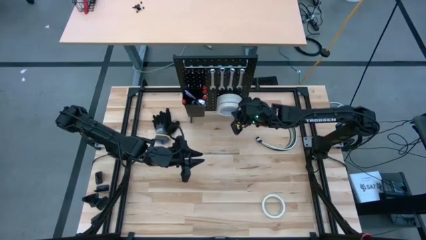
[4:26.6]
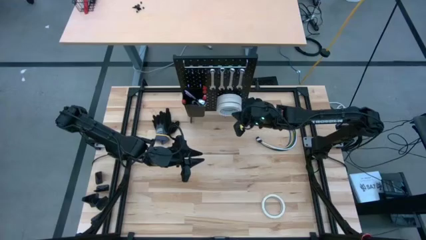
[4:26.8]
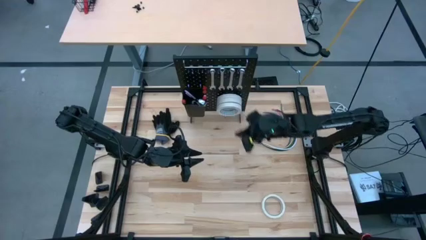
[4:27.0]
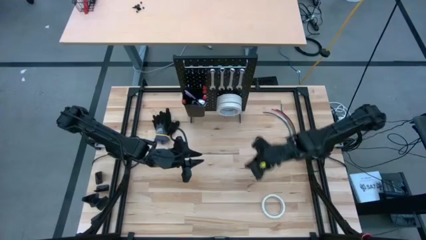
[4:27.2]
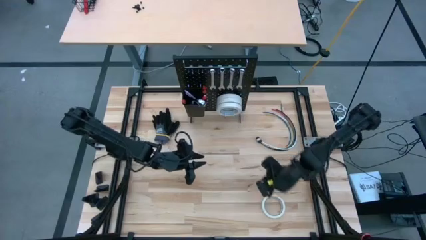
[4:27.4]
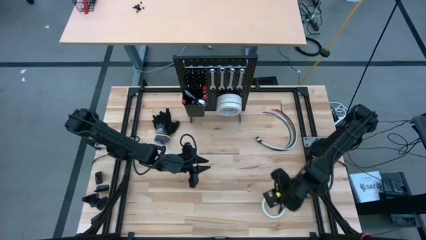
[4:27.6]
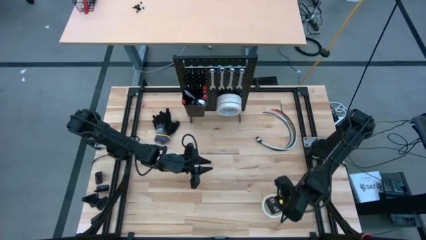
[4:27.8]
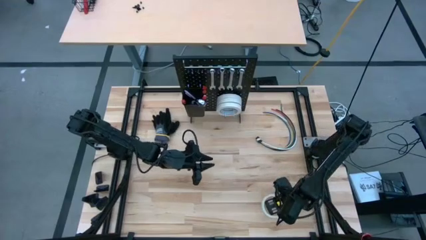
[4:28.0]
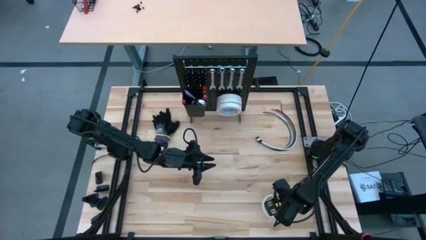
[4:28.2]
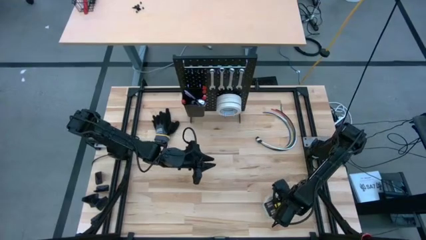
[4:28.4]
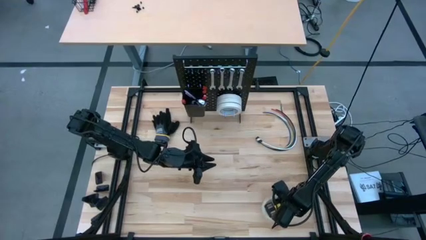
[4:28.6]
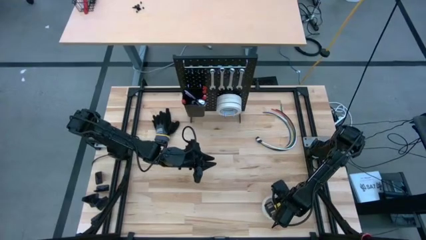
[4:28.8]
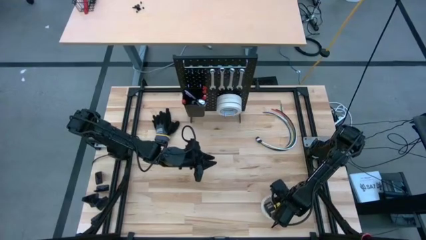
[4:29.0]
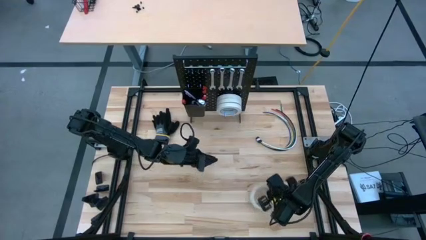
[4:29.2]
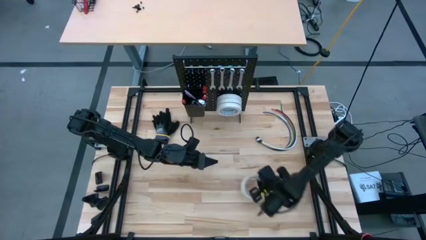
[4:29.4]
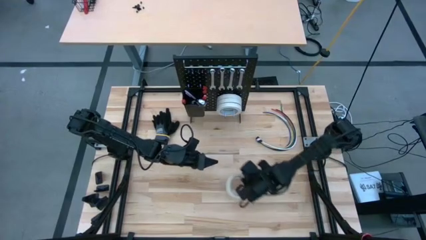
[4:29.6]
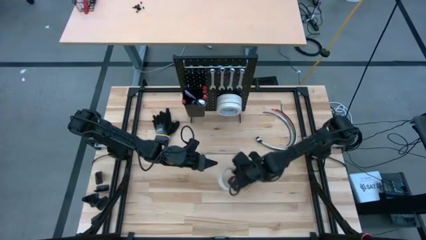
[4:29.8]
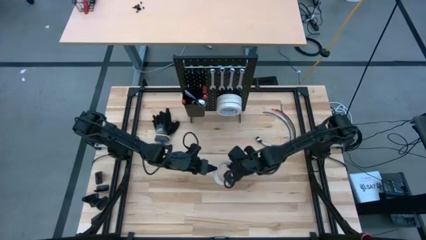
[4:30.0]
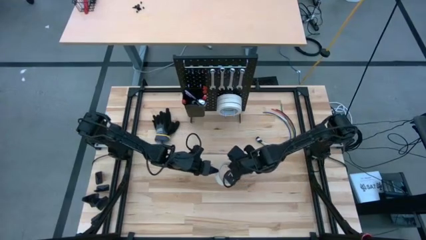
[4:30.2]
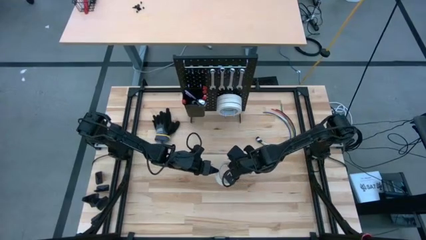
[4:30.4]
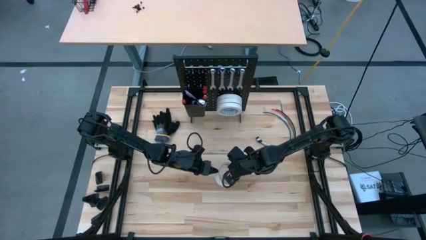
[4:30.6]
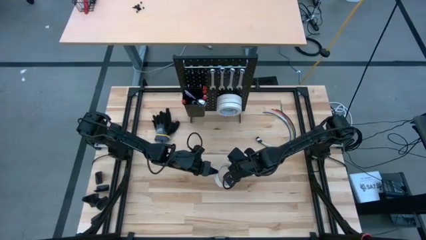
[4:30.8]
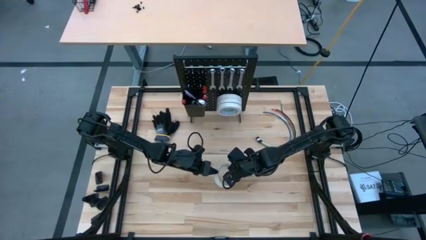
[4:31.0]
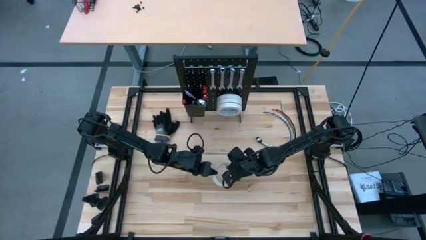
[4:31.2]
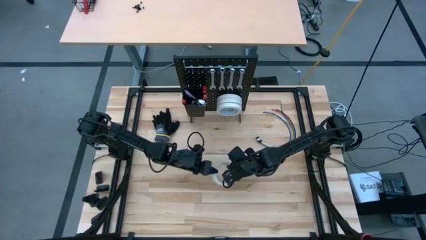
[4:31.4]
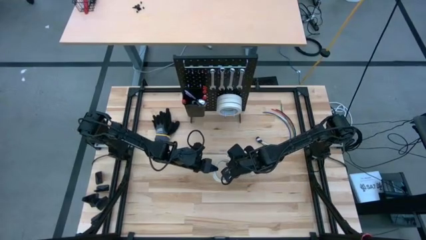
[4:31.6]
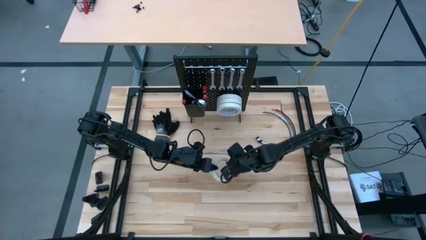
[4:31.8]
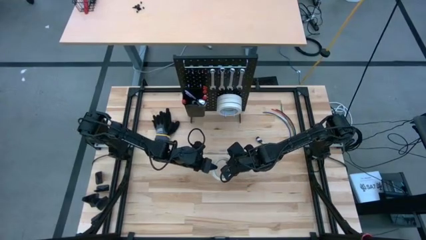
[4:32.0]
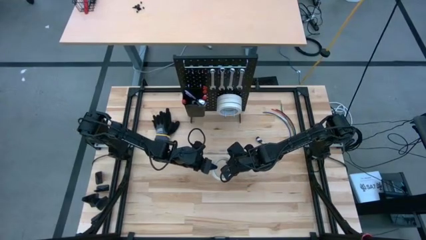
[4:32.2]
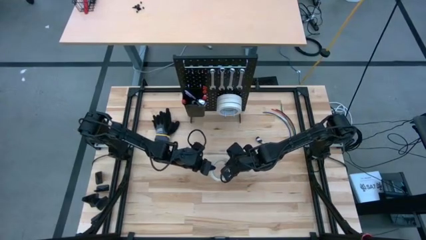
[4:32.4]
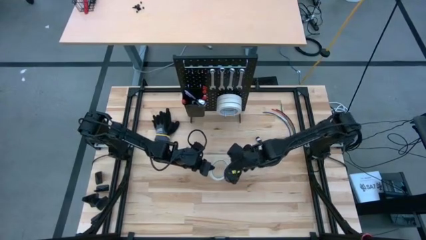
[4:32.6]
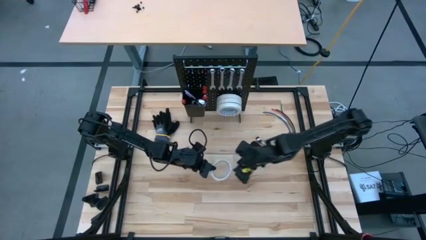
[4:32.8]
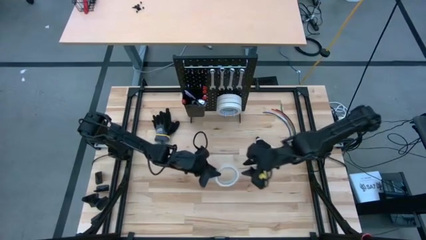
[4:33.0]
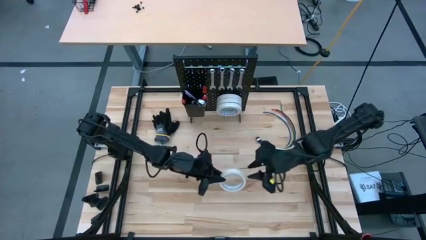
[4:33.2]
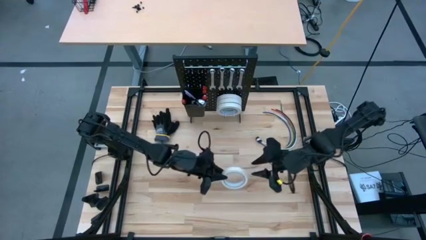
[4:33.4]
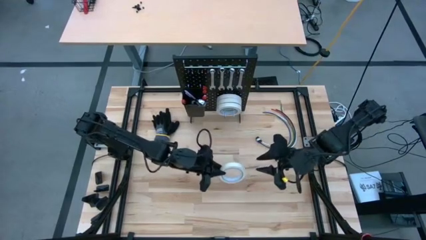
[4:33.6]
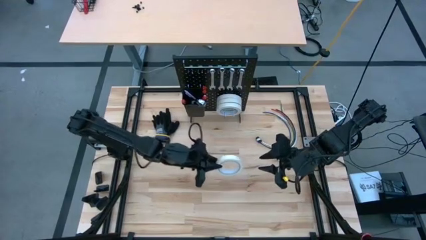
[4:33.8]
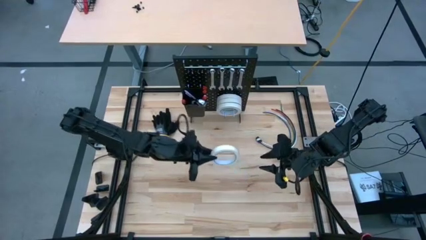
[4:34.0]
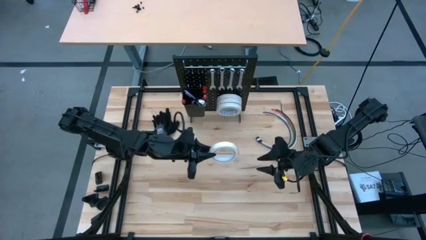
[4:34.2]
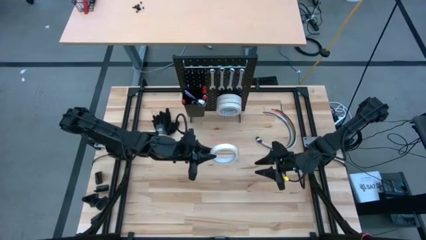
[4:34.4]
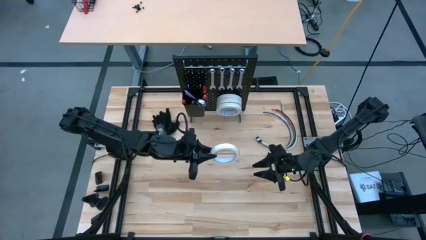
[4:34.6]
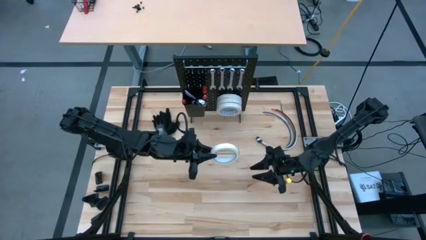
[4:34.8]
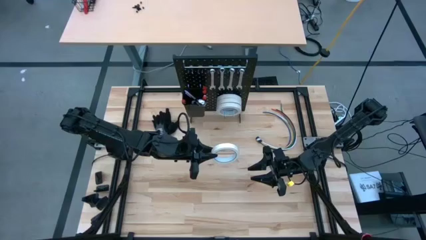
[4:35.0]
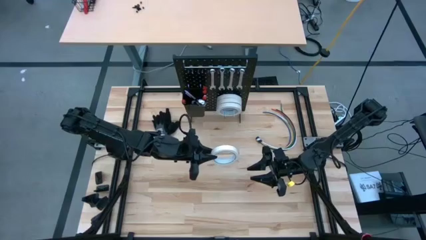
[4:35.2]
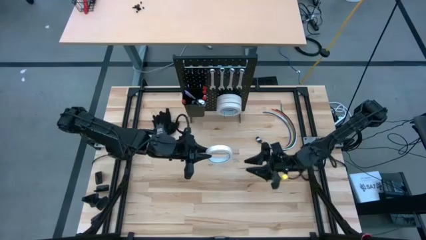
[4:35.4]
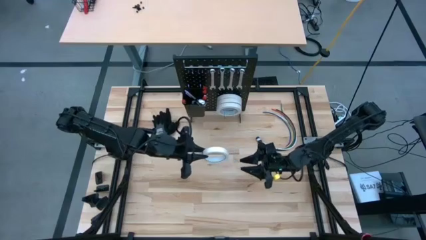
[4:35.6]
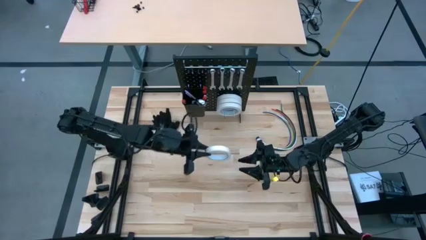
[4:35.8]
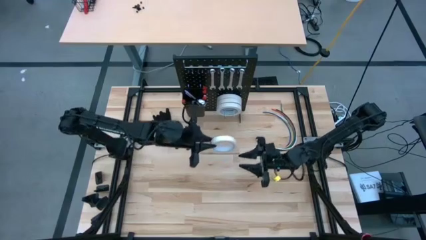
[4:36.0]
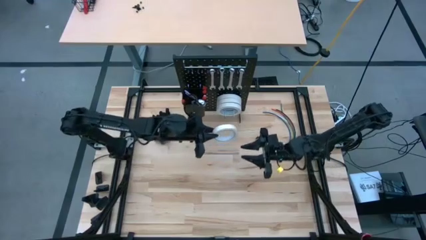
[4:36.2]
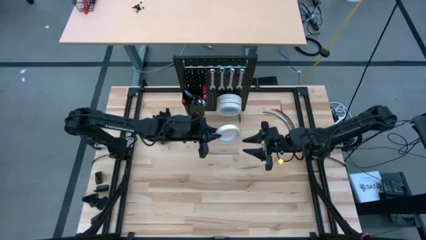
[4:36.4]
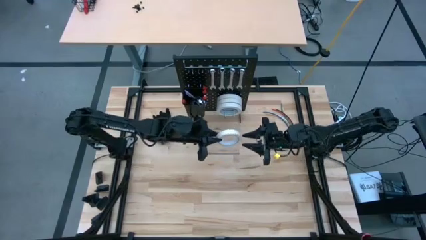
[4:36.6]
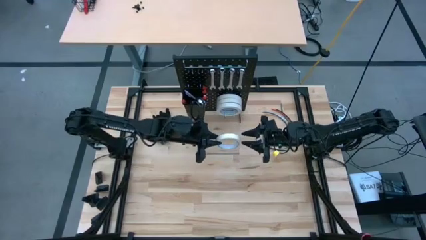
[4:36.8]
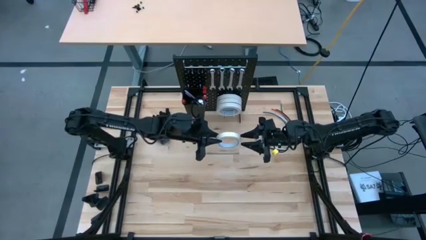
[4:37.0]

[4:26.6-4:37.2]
Task: Hang tools onto peg board
Hang the white tape on the peg board

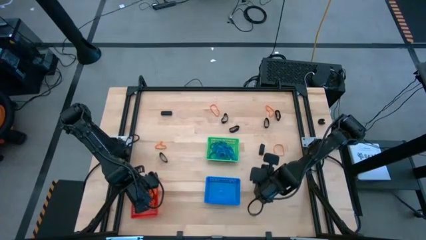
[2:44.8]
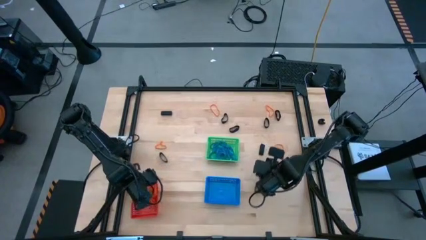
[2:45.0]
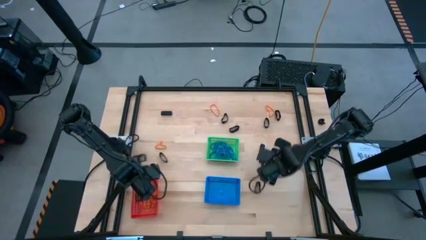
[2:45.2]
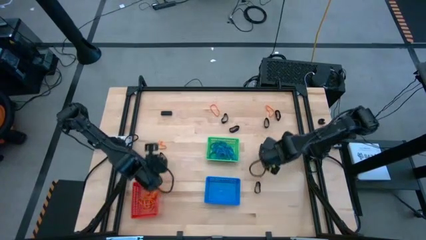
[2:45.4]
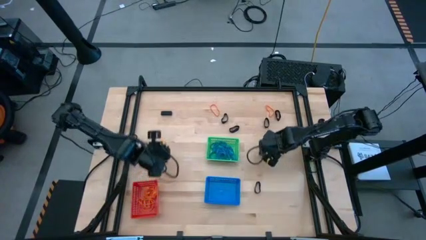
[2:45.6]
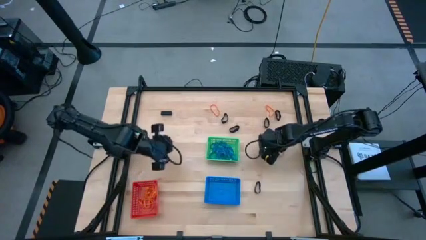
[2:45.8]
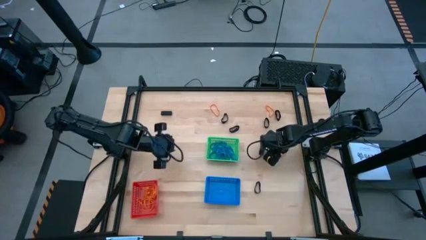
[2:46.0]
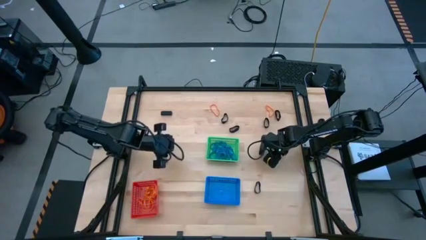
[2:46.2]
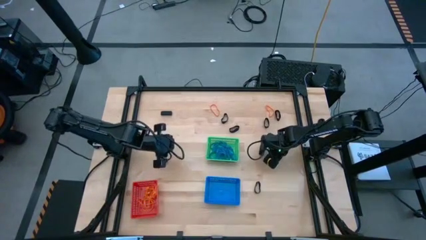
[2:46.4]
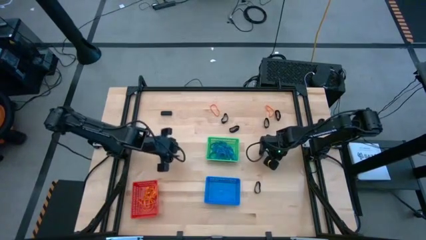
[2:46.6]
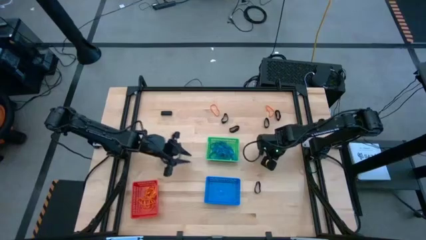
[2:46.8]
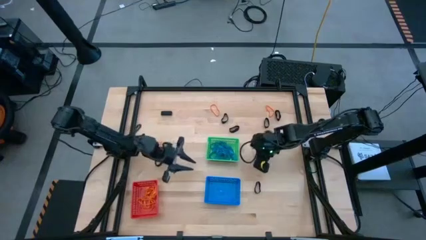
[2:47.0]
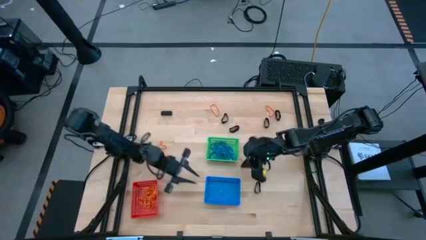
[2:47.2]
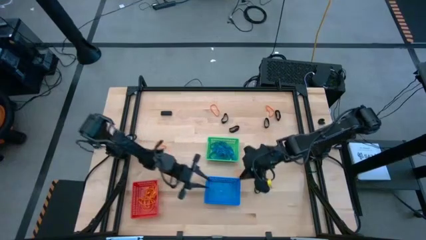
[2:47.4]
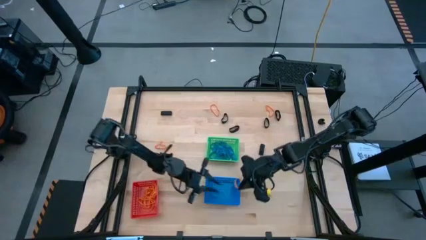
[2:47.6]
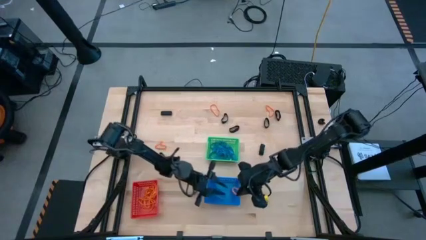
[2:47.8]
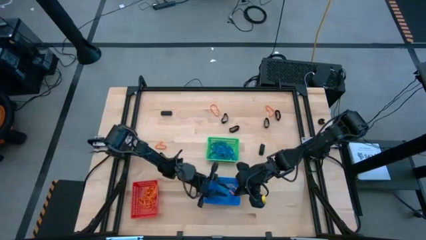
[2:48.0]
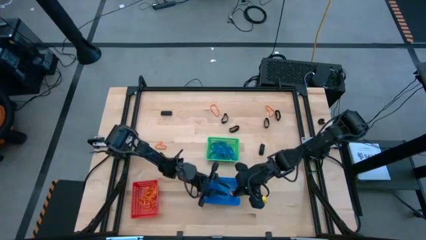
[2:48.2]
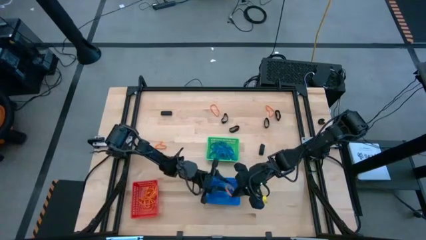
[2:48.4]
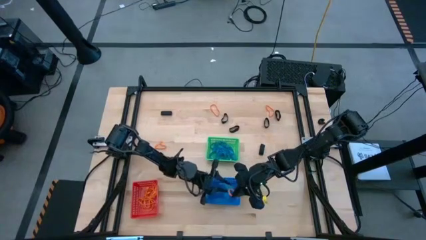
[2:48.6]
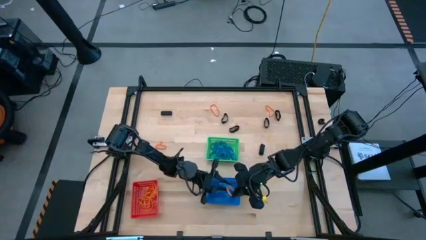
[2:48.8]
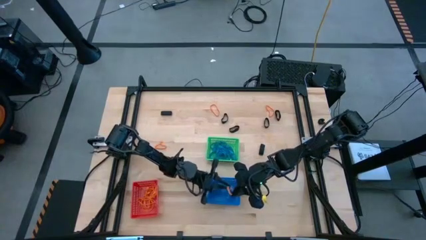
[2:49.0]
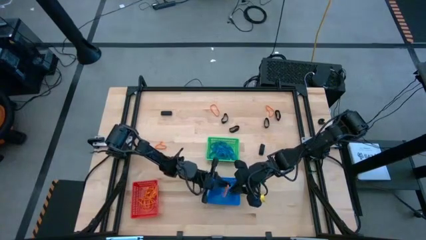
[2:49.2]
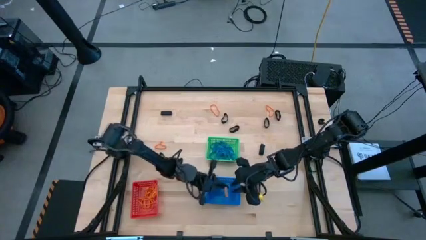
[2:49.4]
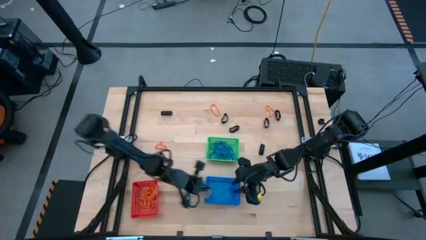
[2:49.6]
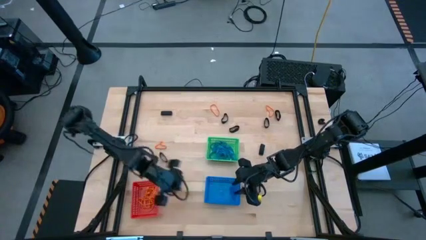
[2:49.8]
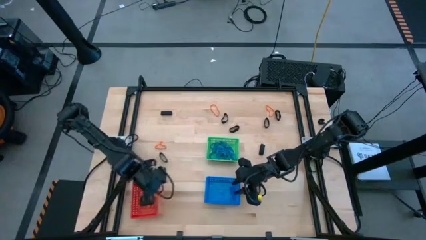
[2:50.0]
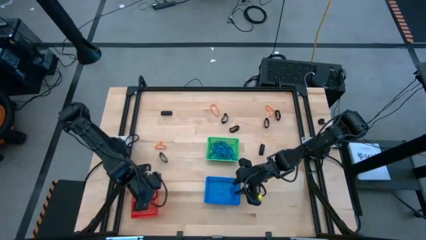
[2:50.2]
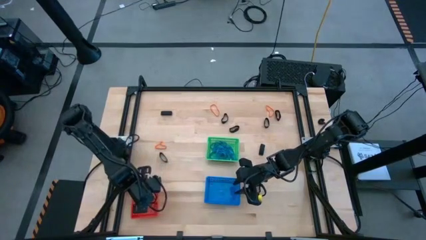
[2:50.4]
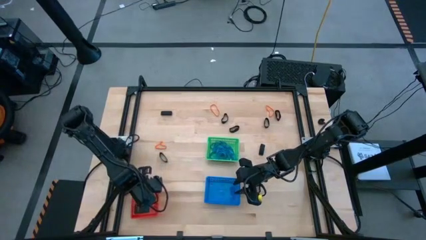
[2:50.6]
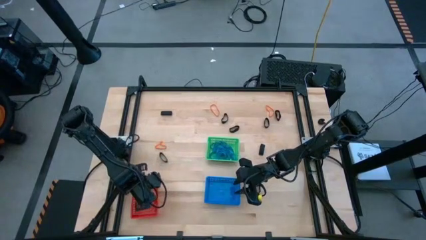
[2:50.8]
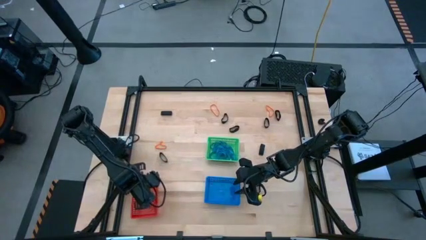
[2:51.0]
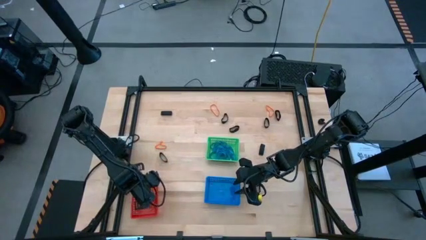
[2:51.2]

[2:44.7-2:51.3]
Task: Sort rubber bands into baskets
Put the orange rubberband into the red bin
